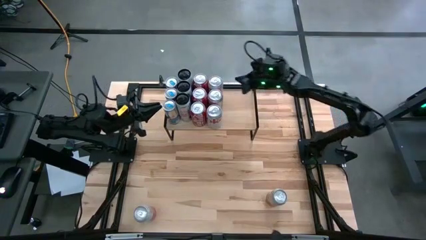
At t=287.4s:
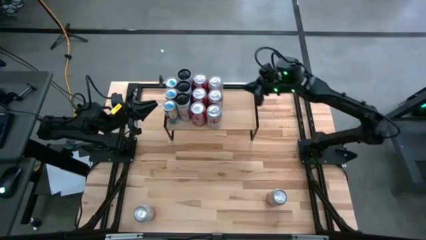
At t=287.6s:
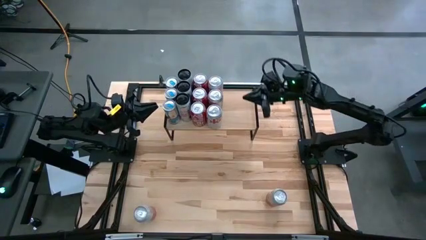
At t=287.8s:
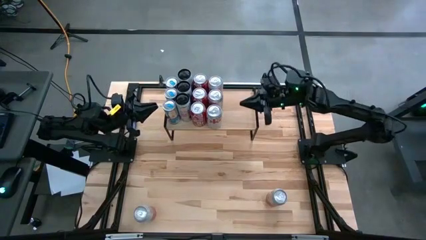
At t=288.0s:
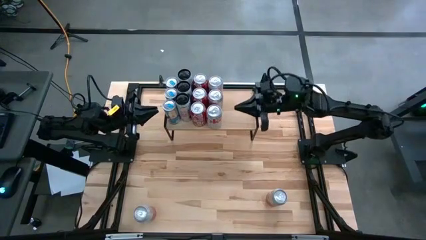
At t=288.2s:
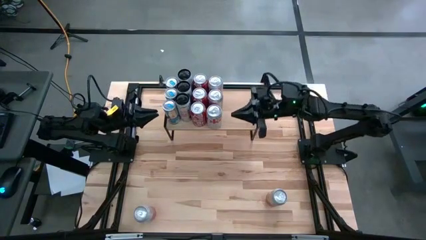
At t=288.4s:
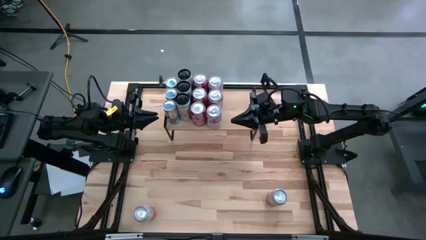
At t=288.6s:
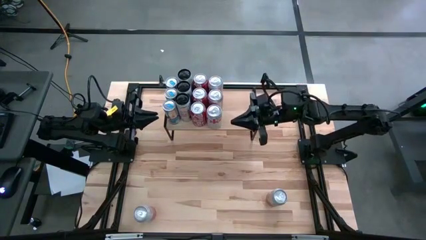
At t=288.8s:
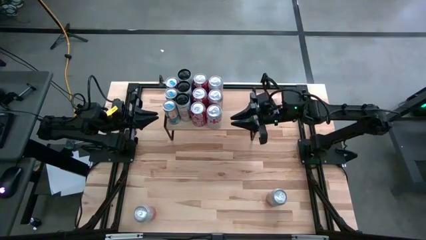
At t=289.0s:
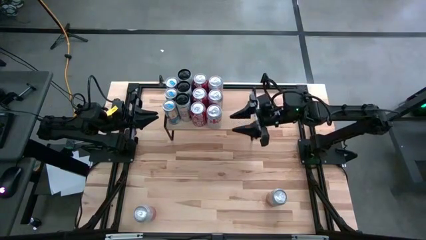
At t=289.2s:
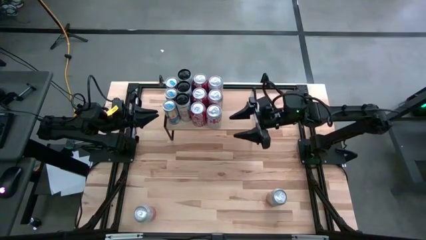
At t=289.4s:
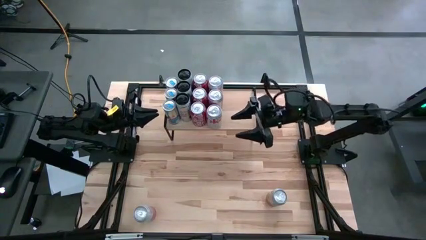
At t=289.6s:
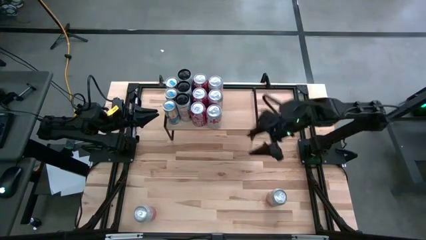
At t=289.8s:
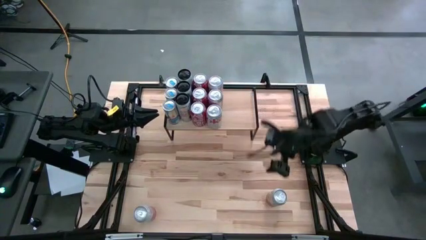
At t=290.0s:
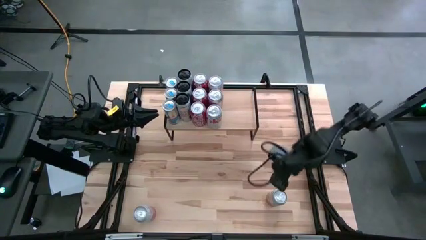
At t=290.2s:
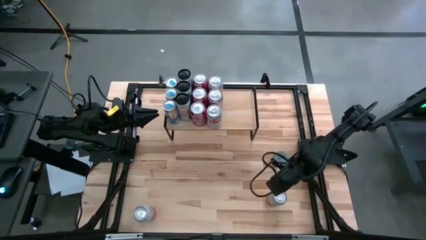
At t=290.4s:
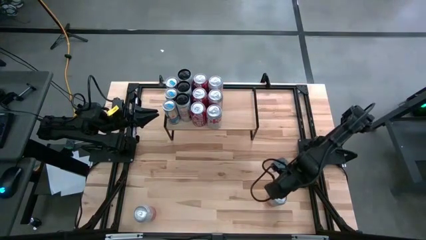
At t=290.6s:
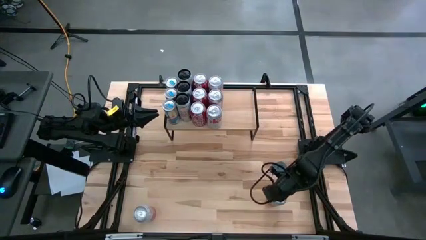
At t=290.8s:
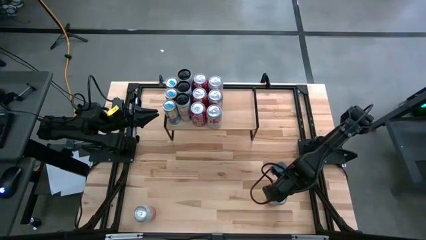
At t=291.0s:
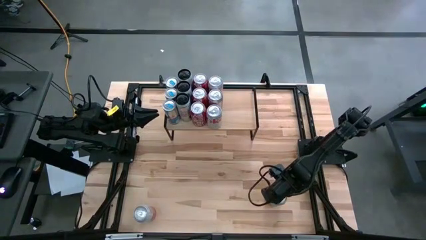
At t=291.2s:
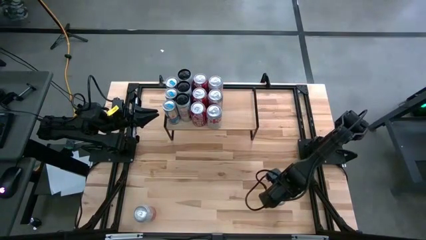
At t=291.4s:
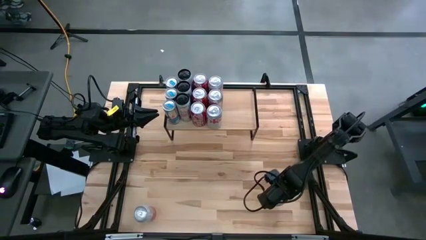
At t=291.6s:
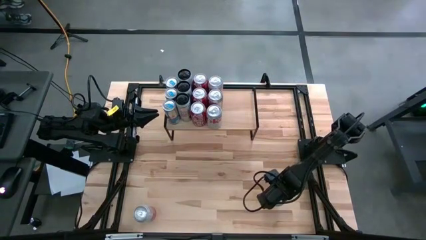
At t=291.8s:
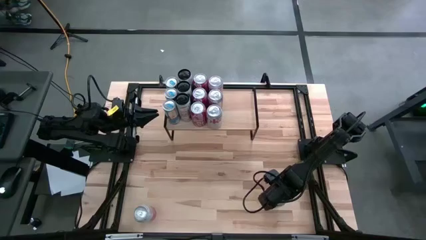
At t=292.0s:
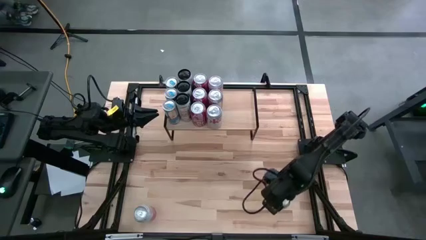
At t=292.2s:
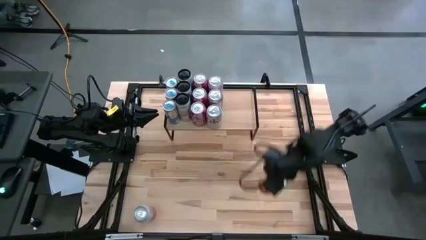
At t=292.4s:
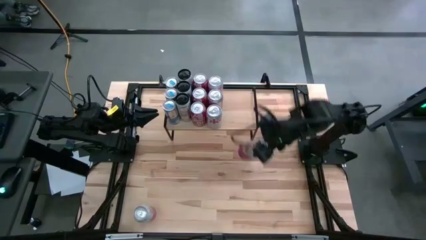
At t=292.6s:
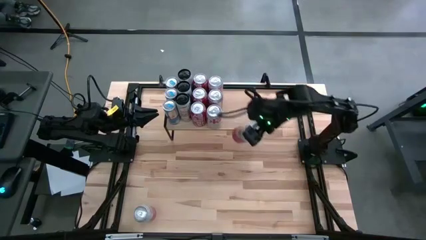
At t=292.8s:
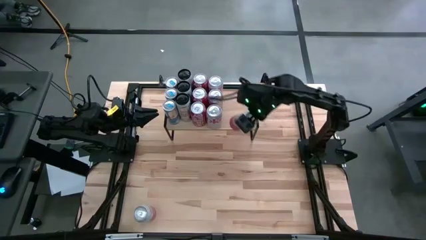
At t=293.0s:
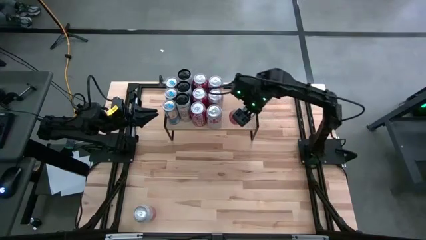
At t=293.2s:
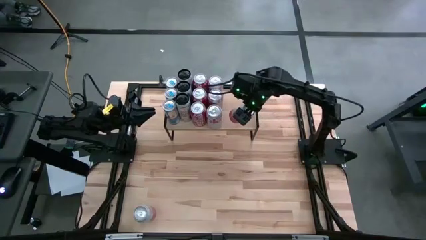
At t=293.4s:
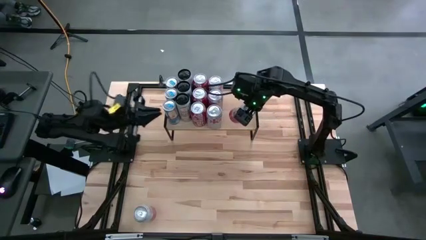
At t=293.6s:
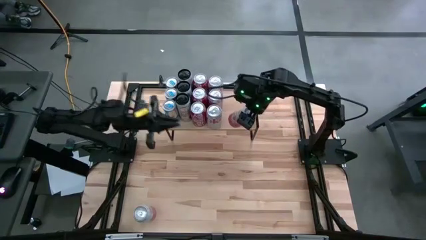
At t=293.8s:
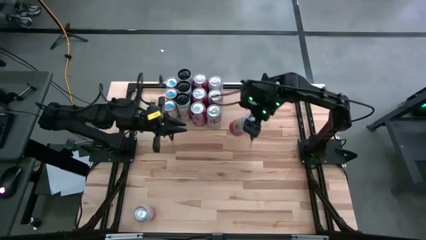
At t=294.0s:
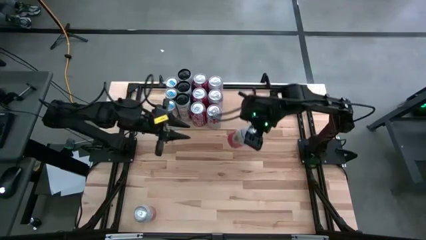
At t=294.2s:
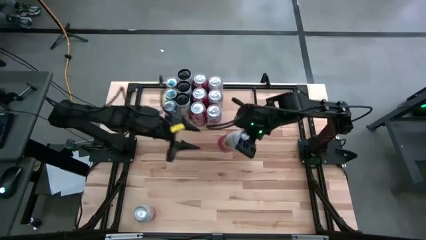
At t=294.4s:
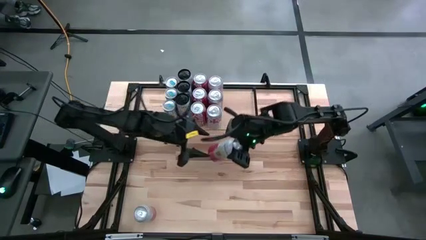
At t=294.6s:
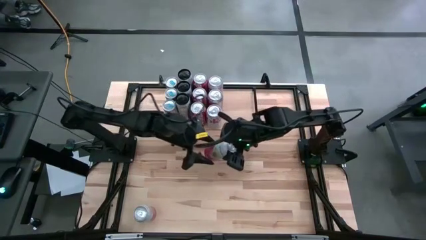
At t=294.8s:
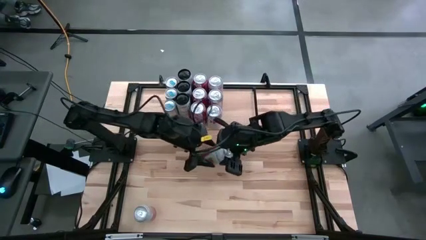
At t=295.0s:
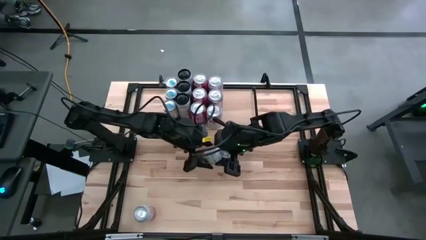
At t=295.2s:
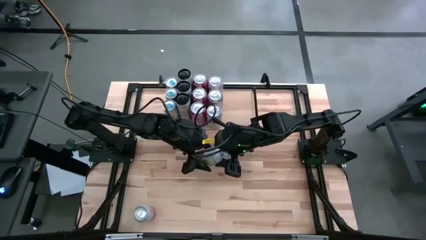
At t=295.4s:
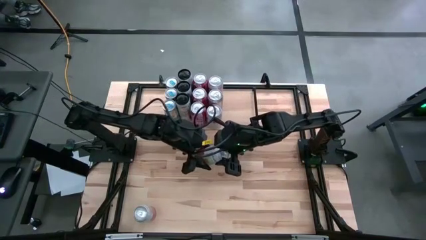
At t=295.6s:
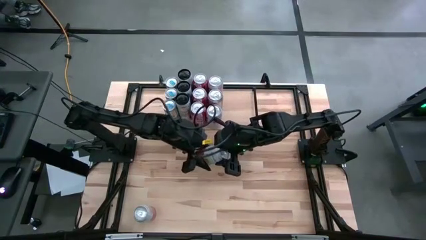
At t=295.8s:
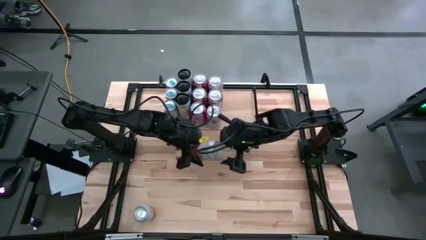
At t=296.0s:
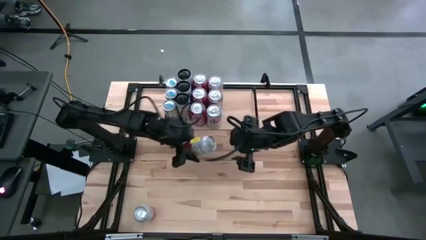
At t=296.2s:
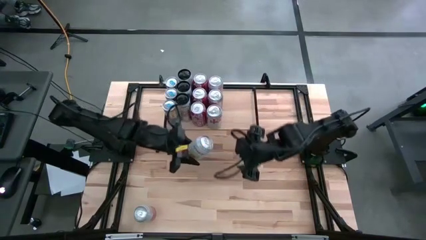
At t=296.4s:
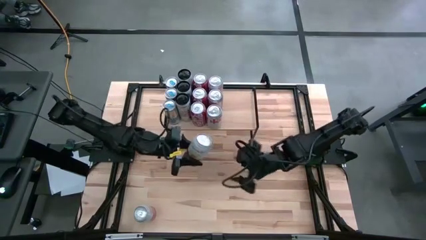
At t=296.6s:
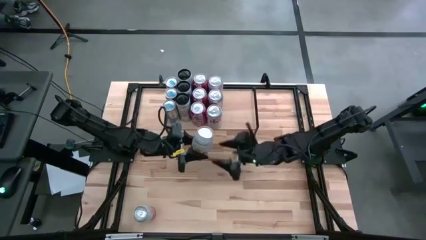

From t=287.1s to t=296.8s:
Task: Place canned beverage on shelf
Put the right pink-white soda can on the shelf

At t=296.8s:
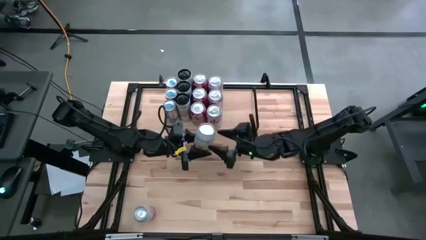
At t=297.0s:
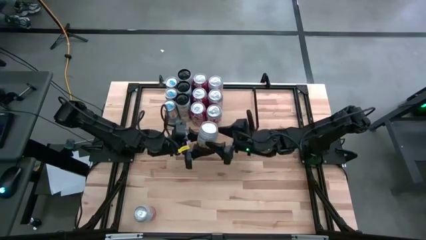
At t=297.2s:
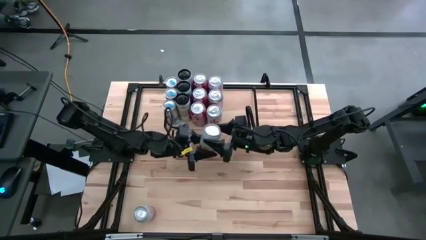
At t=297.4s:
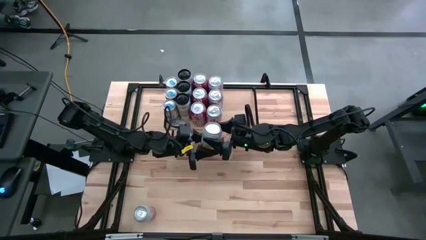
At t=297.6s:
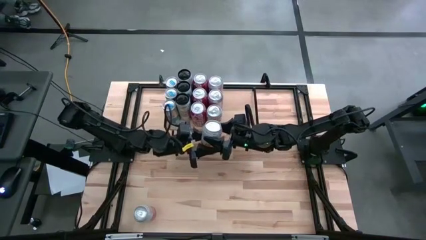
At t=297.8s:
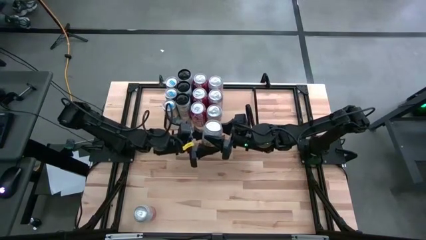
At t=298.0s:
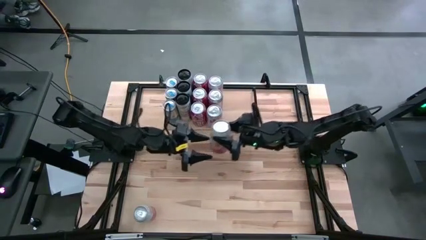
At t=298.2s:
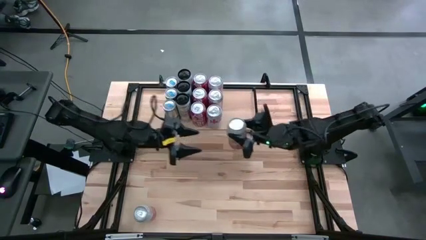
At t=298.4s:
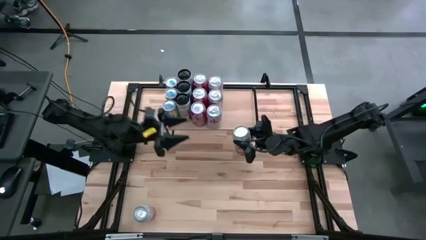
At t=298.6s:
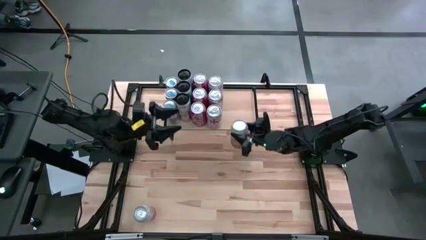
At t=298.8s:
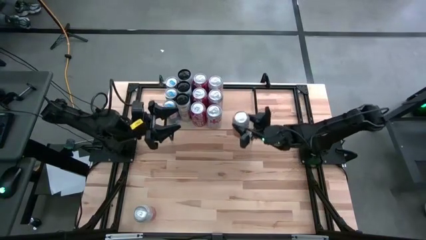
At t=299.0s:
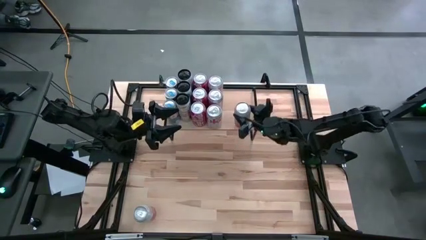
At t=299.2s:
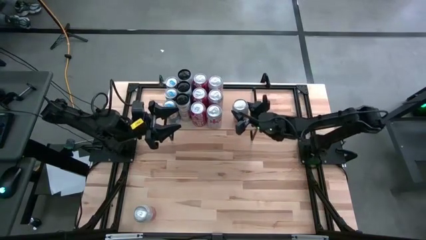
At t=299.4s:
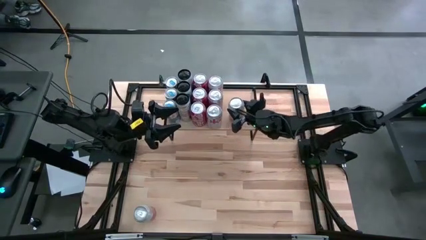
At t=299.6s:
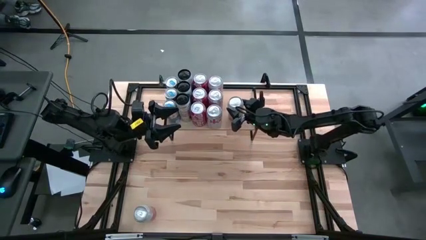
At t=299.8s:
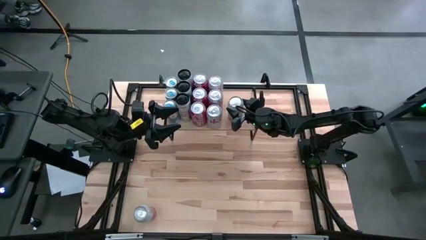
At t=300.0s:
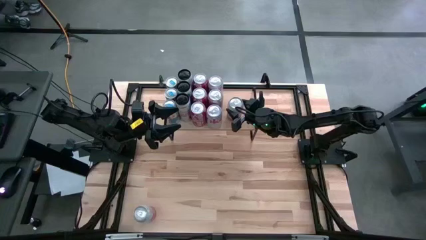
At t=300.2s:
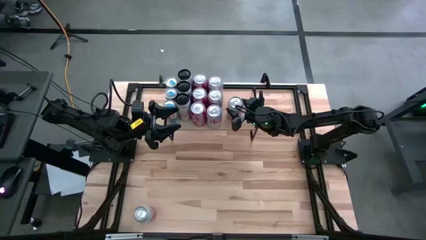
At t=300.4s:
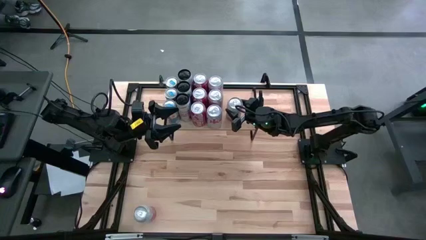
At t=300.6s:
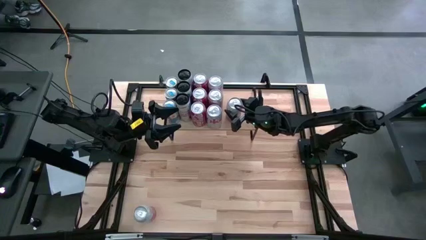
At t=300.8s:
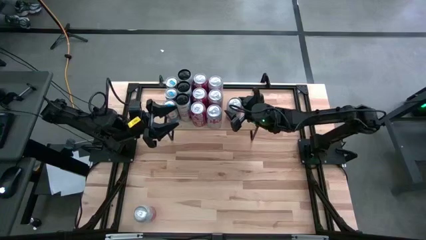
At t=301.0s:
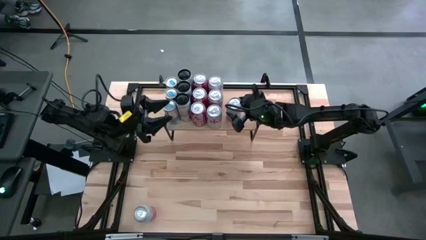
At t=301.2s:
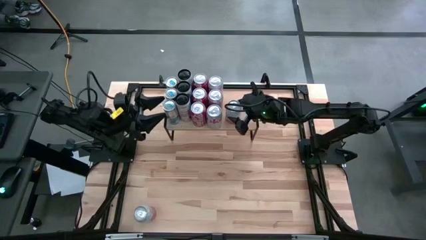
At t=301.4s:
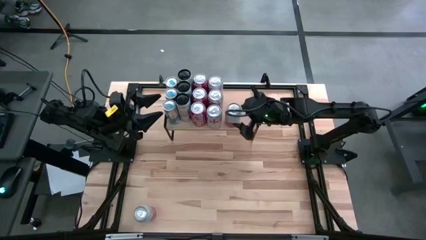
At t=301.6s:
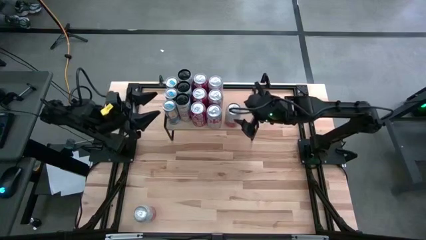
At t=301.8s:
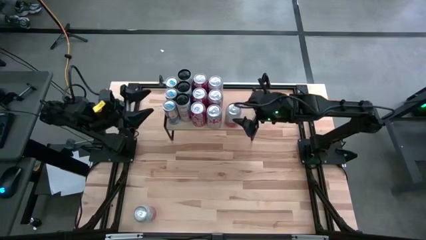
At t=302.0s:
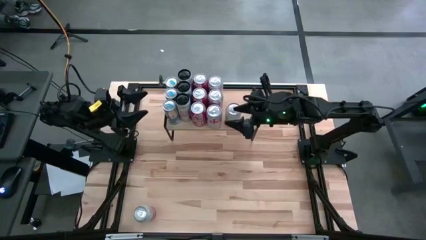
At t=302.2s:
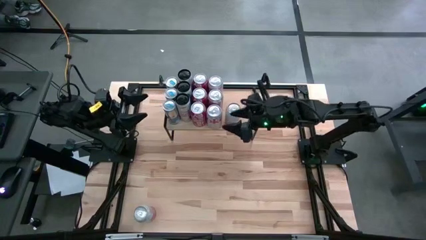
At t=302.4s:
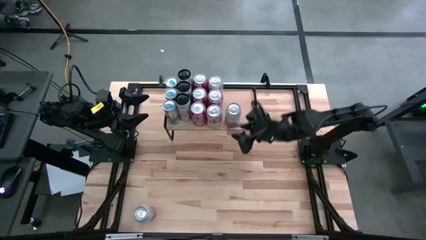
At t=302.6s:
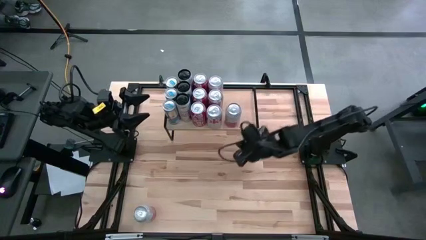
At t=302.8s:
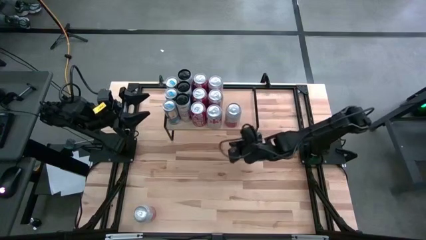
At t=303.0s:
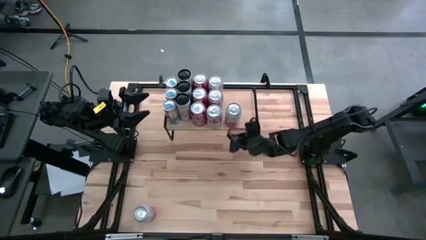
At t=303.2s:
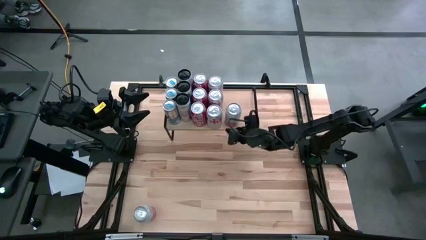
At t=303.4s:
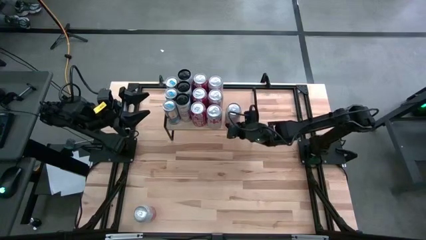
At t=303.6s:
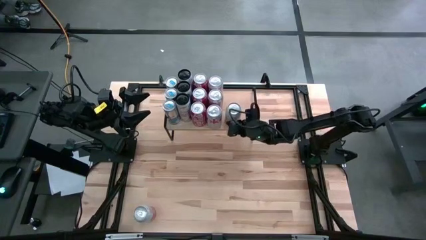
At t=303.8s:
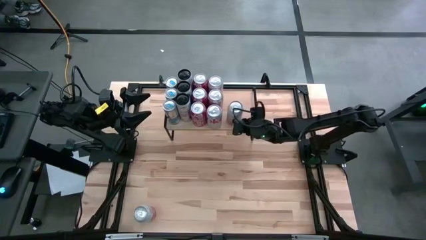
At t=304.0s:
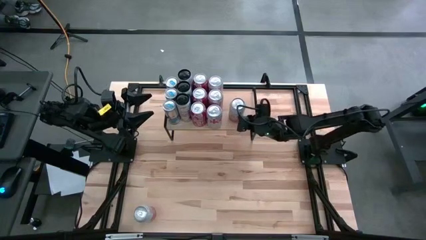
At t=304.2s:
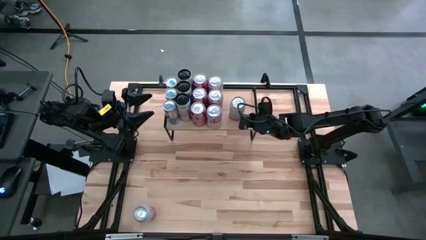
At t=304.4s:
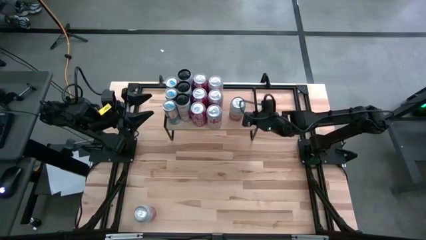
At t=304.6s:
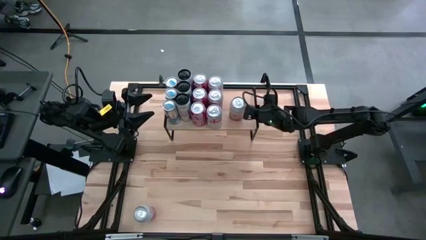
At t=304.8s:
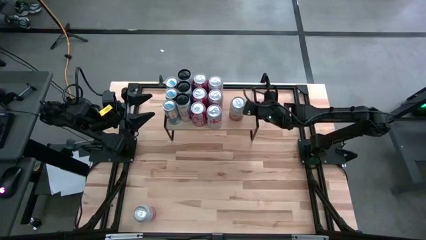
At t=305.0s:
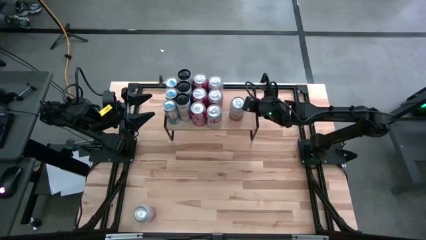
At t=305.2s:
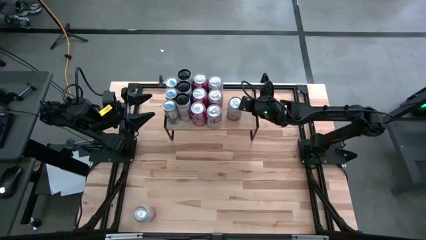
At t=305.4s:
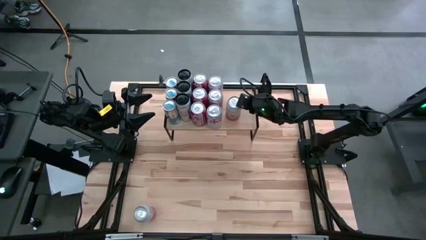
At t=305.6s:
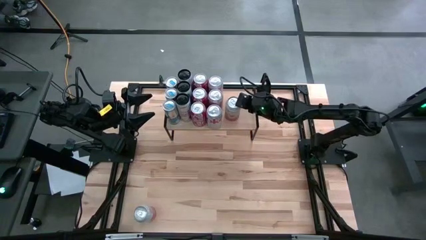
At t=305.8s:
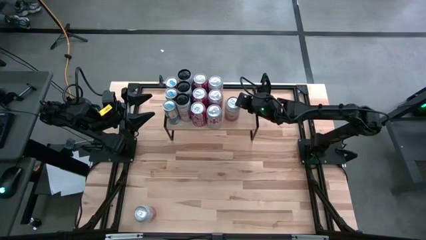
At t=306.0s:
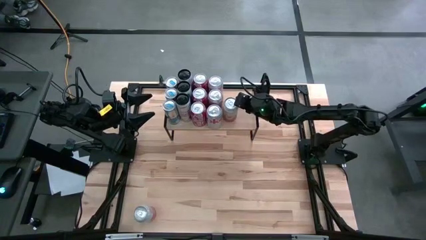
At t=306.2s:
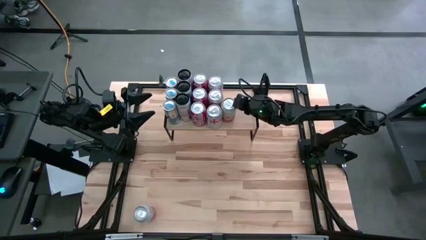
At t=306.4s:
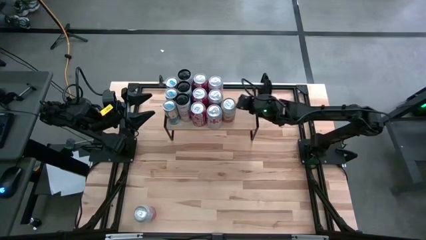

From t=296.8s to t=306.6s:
Put the right pink-white soda can on the shelf
